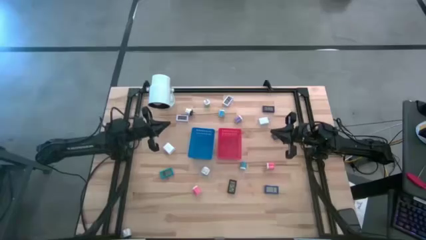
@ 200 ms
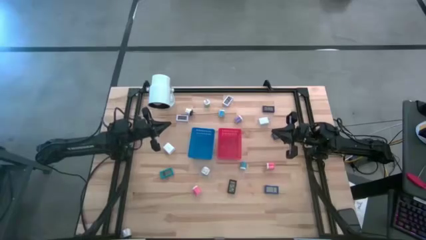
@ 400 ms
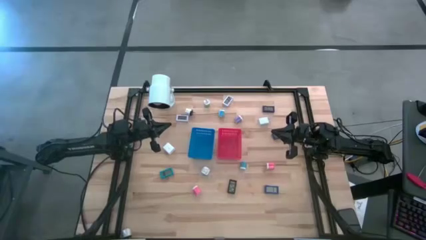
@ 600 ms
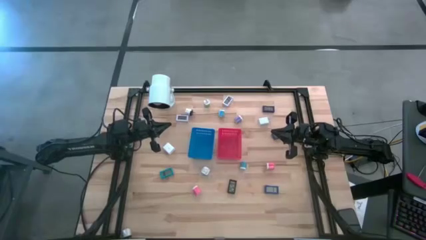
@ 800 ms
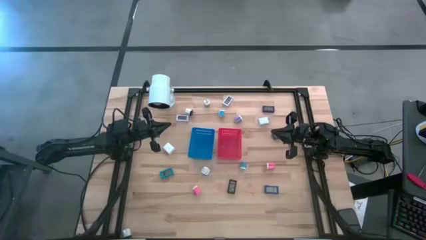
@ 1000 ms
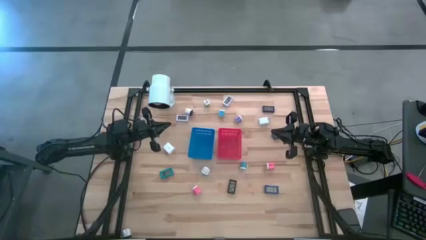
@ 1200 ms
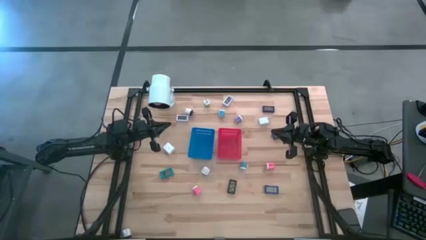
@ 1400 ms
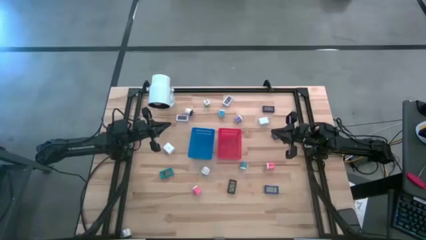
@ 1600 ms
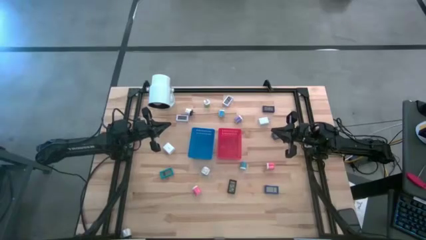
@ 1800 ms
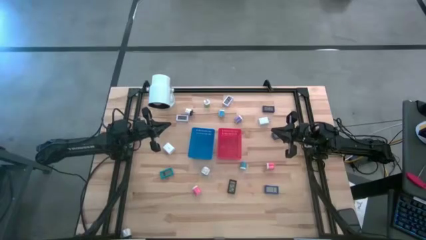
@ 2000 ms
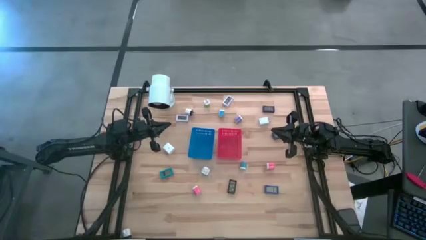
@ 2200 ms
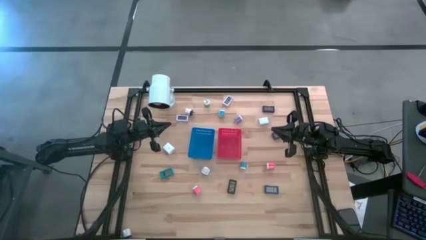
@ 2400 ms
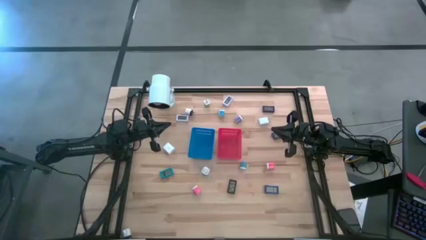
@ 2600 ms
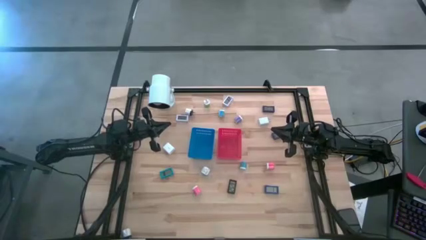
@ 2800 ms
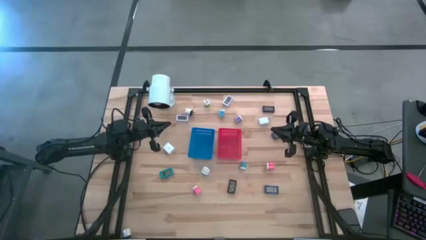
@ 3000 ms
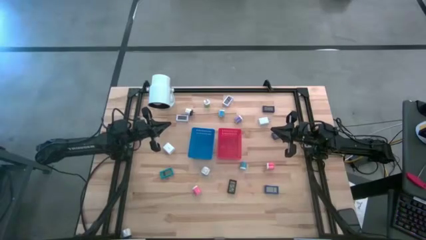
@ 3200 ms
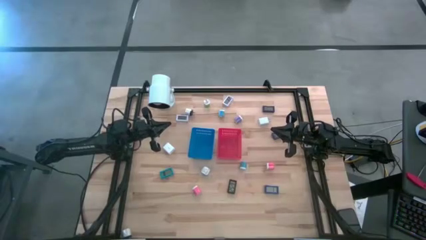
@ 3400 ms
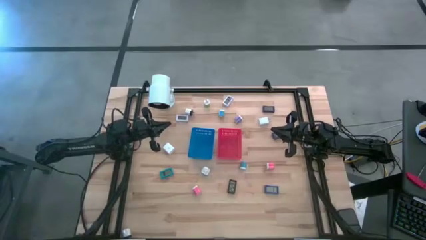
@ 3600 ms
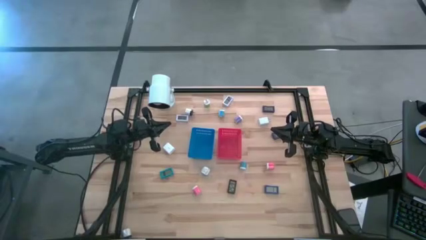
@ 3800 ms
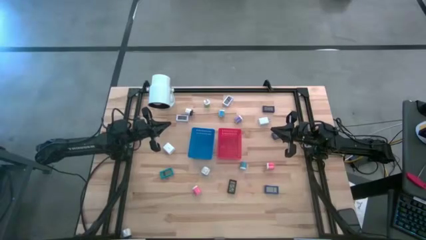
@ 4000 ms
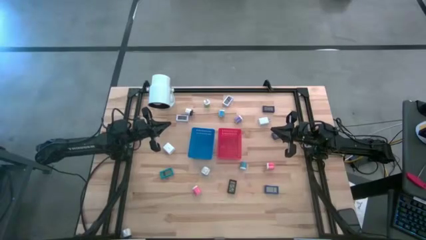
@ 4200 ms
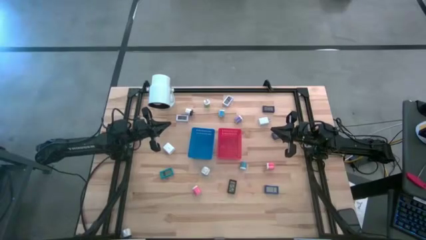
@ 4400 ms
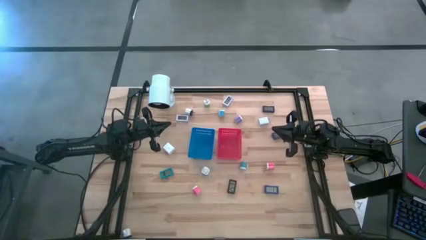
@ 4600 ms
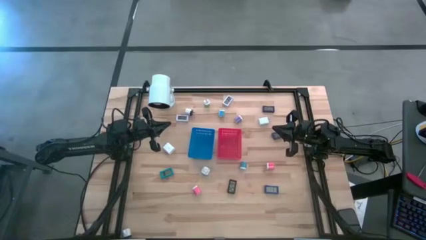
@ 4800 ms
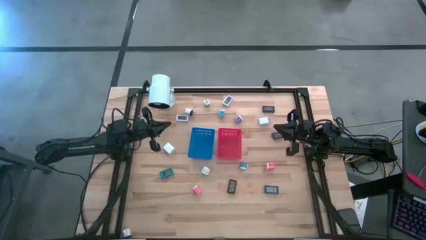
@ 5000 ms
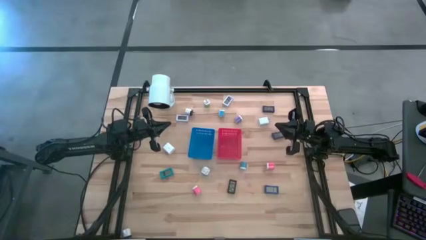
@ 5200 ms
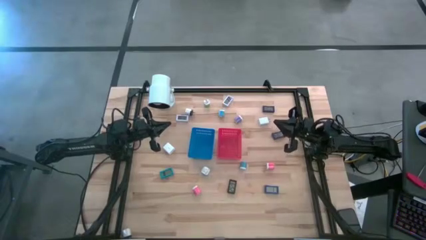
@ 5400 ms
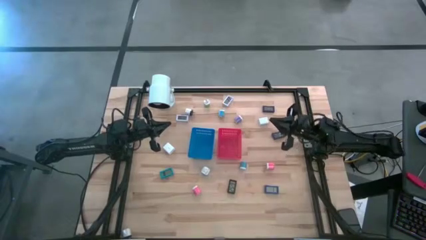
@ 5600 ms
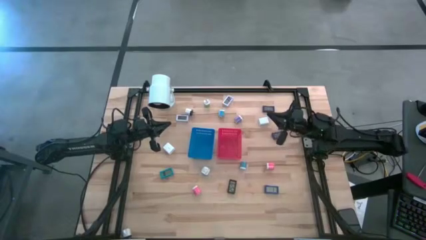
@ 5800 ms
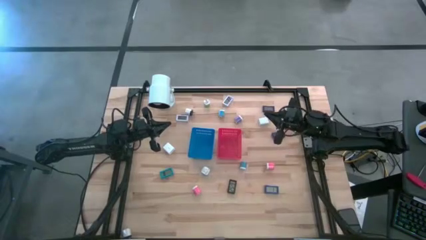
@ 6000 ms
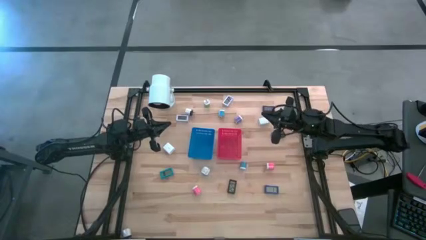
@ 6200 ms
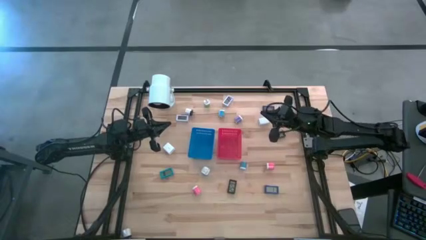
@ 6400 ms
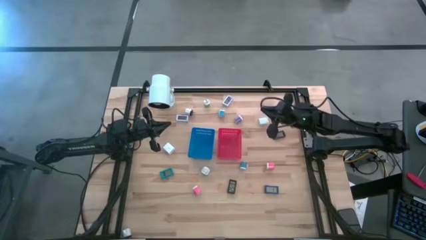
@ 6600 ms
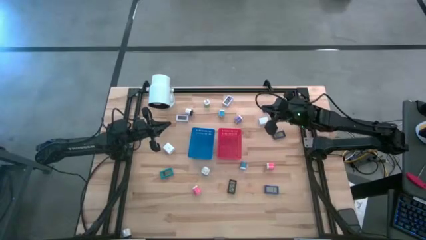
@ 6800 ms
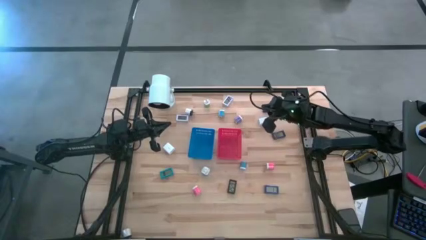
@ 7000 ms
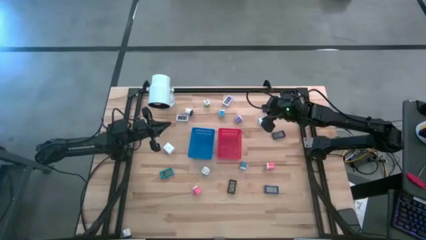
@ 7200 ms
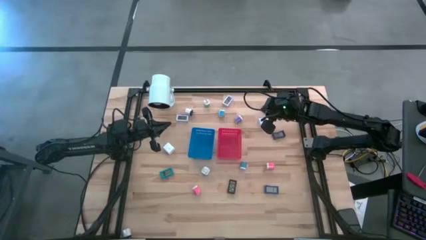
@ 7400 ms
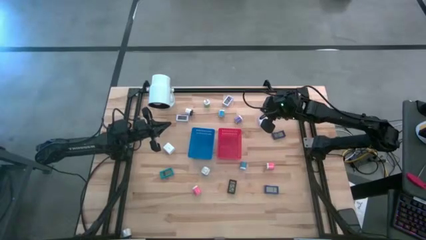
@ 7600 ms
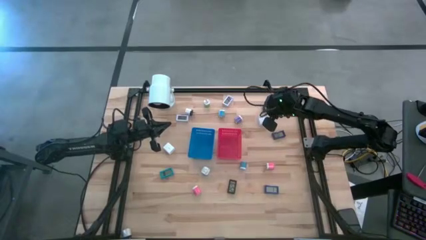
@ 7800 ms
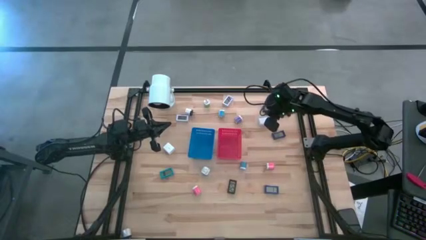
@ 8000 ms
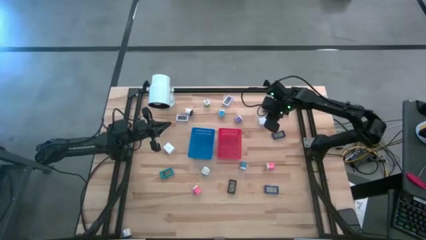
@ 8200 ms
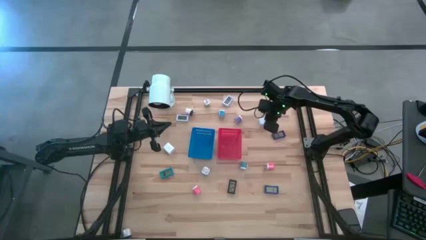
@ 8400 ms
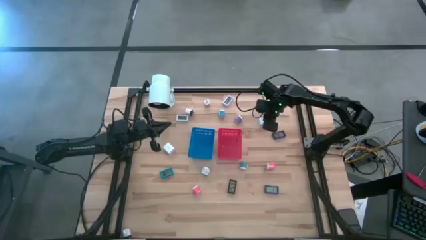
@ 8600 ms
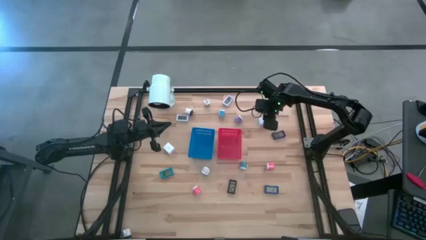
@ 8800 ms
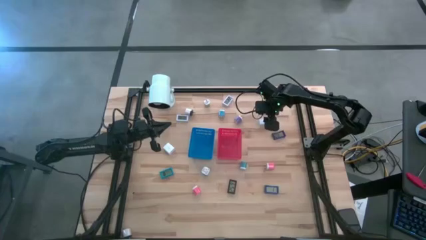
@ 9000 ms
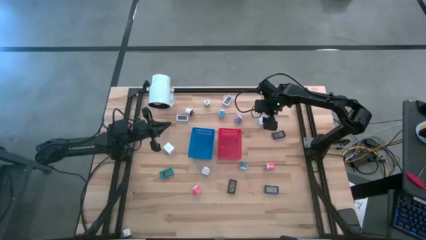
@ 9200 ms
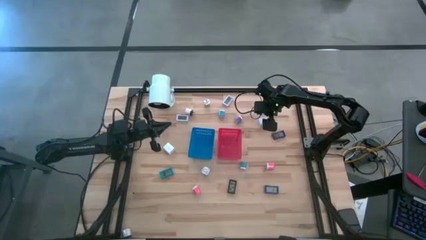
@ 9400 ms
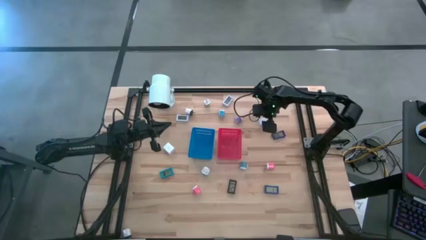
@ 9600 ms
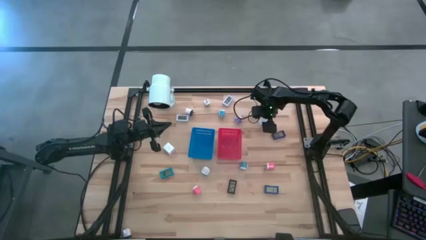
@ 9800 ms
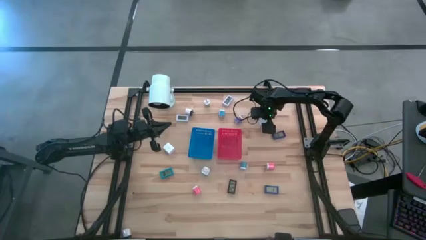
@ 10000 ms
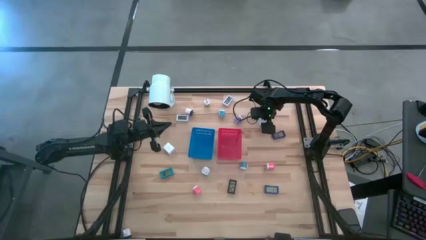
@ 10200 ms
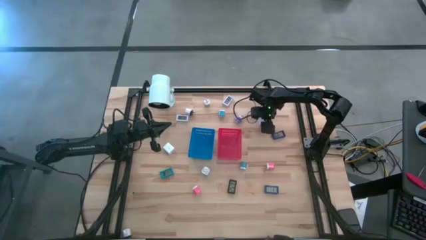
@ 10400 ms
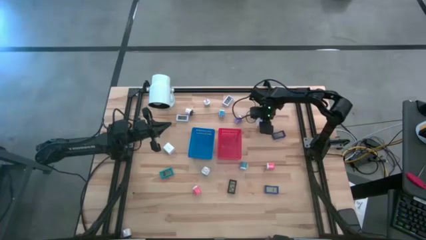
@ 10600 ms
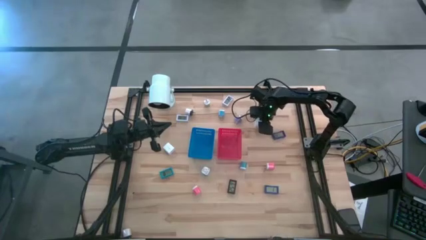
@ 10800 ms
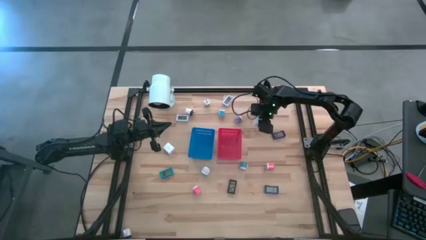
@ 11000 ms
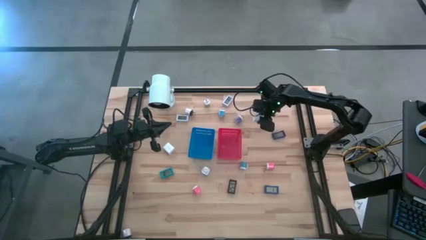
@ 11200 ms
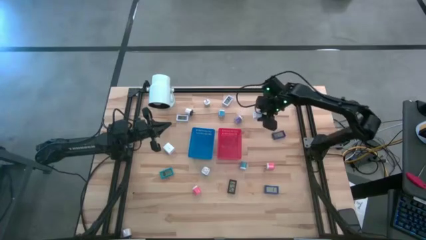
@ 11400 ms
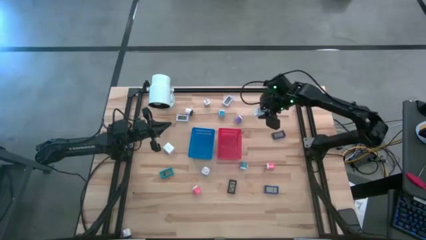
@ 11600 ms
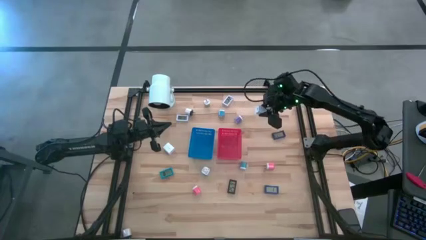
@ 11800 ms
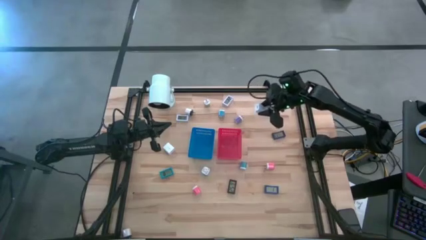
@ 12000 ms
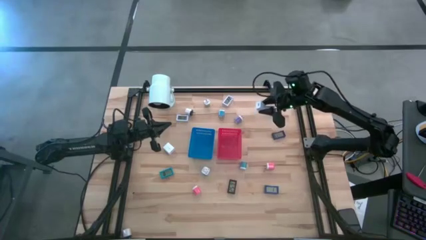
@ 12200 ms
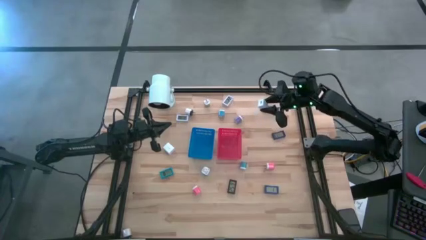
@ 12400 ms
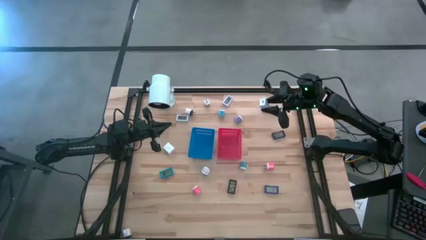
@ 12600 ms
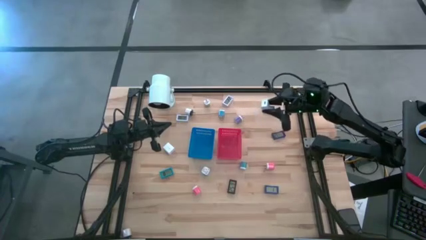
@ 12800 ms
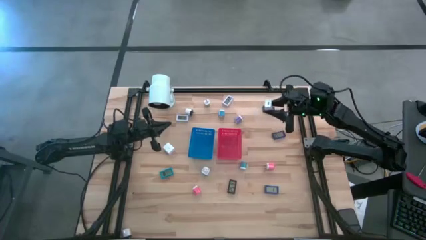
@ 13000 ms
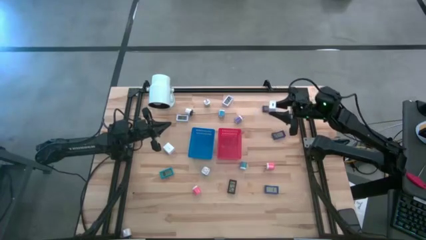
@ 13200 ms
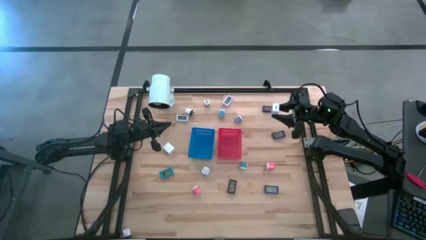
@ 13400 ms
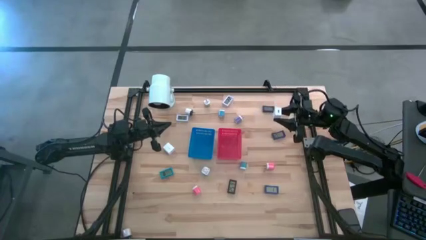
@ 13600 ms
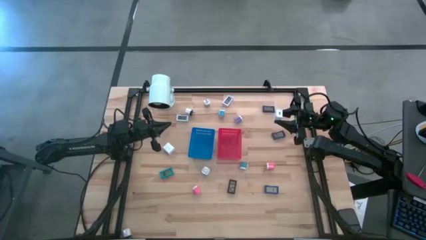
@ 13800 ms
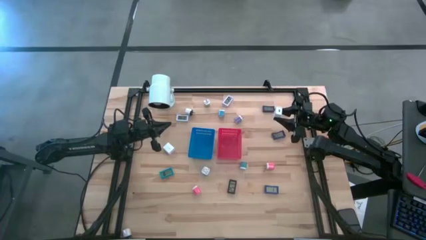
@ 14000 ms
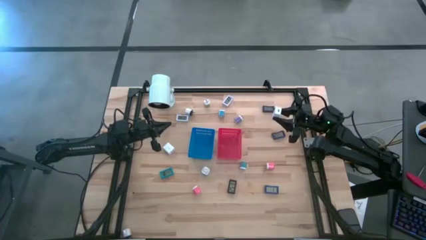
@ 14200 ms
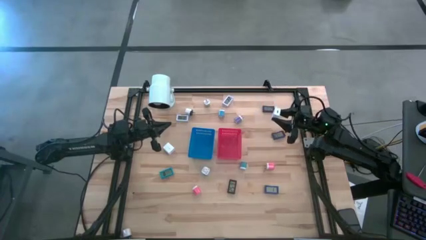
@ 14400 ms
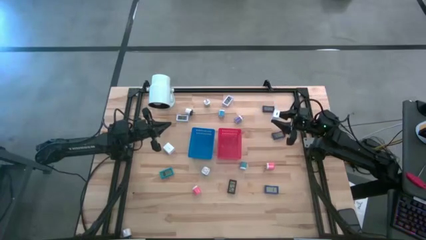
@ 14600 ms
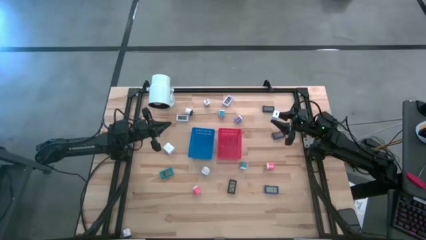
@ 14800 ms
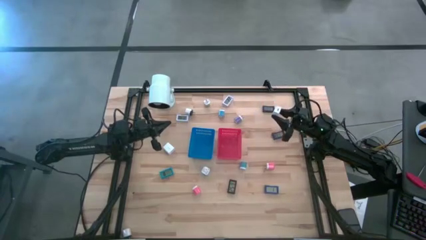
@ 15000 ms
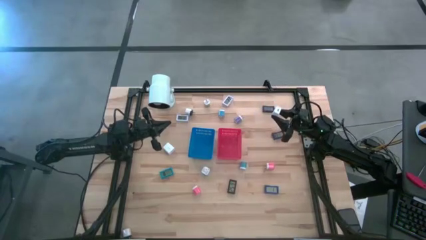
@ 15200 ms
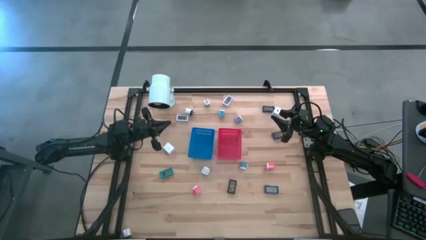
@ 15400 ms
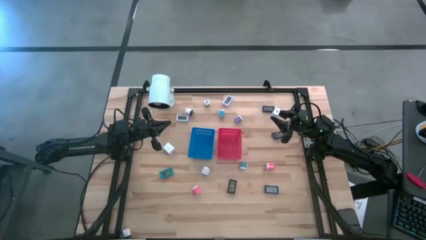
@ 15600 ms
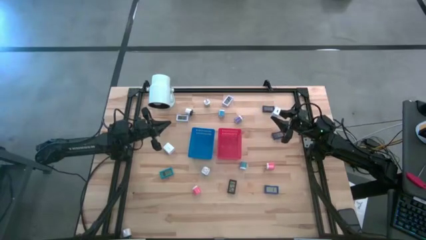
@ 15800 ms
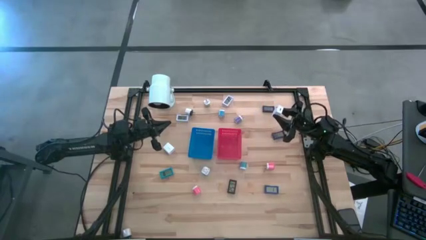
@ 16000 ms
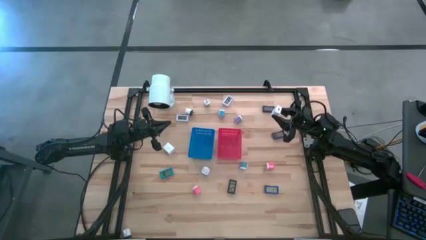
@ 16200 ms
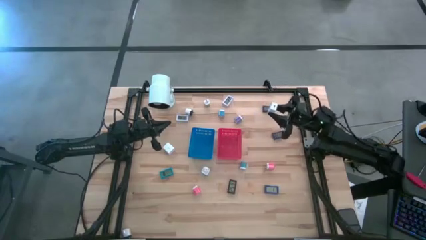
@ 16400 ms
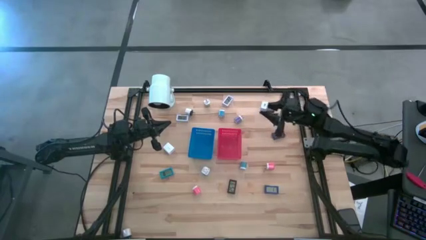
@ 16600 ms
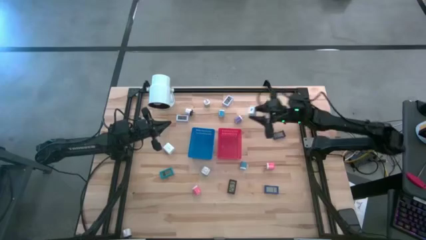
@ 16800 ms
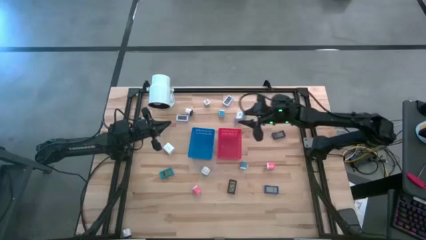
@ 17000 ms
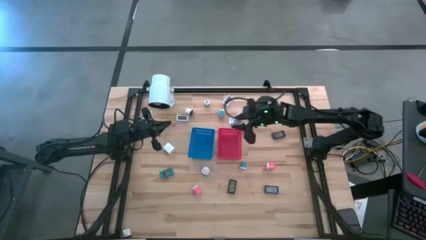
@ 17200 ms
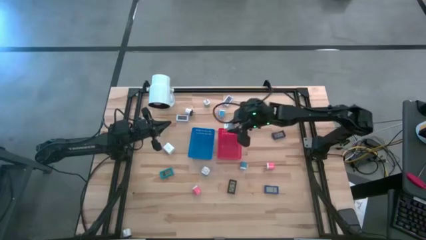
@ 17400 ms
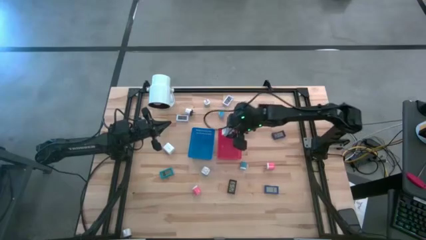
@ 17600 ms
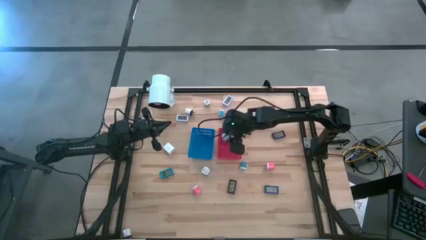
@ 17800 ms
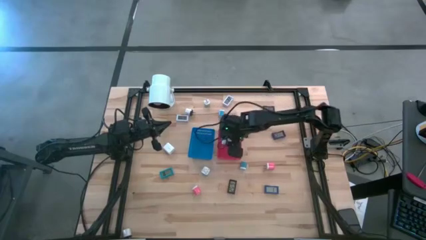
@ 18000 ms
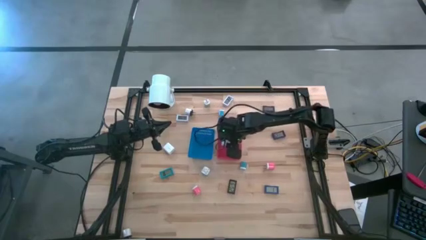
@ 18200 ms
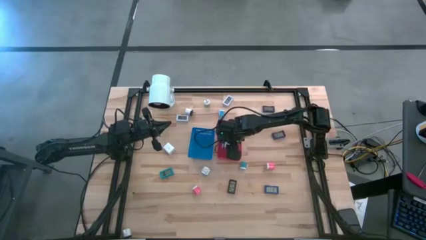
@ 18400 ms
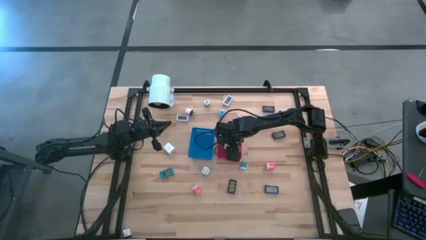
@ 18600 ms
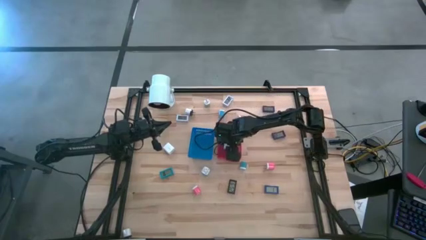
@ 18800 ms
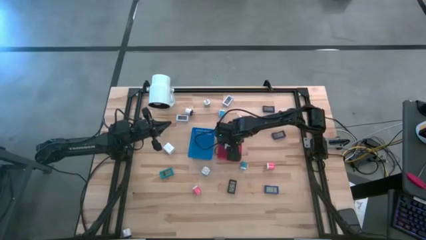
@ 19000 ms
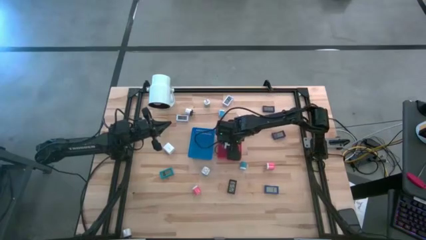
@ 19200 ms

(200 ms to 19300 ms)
Task: Pick & Place Office items
Put the white charger adapter into the red bin
